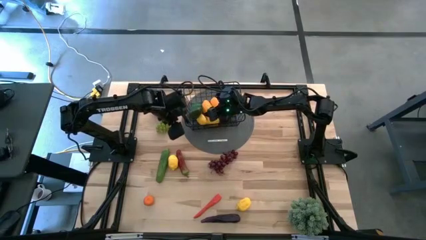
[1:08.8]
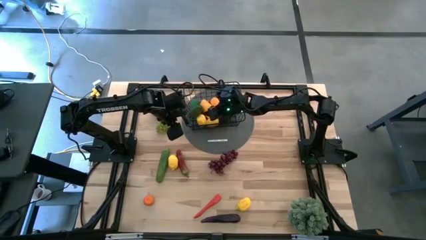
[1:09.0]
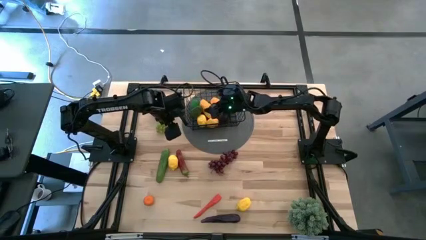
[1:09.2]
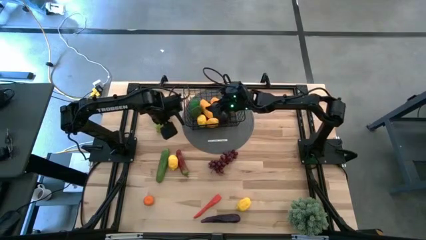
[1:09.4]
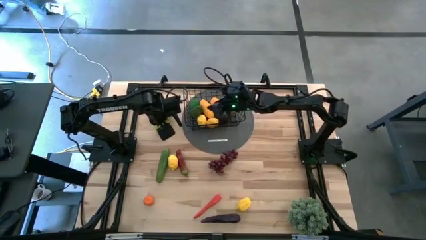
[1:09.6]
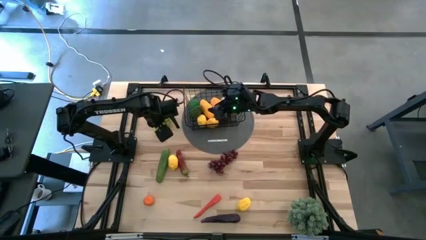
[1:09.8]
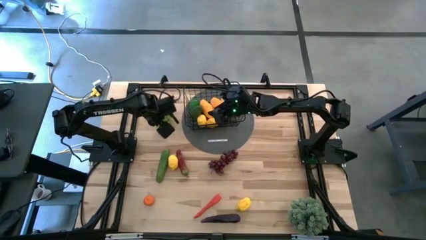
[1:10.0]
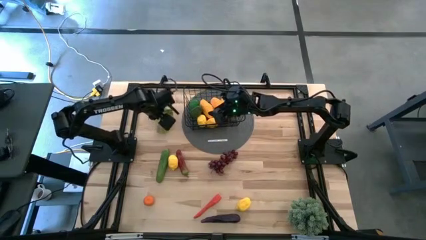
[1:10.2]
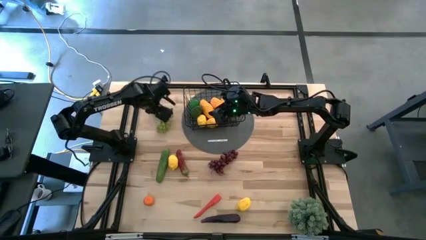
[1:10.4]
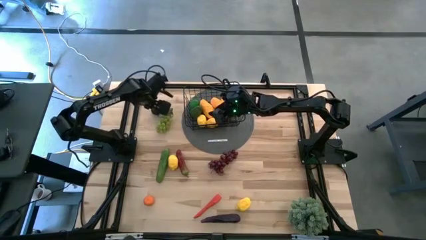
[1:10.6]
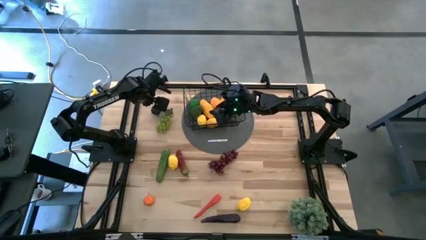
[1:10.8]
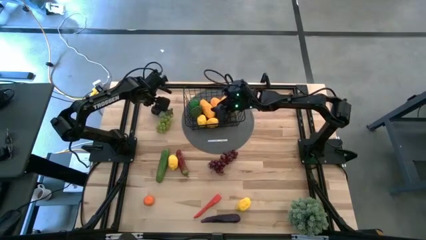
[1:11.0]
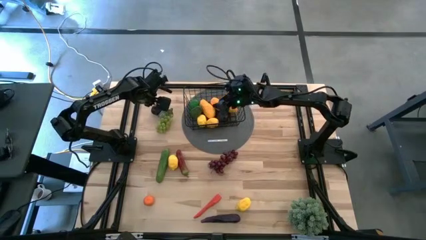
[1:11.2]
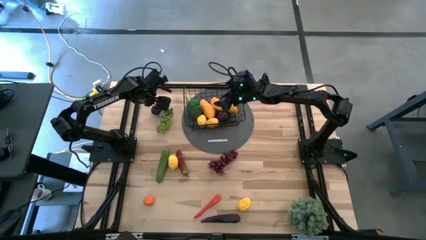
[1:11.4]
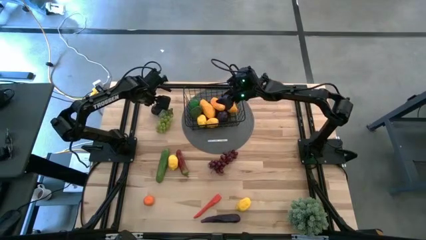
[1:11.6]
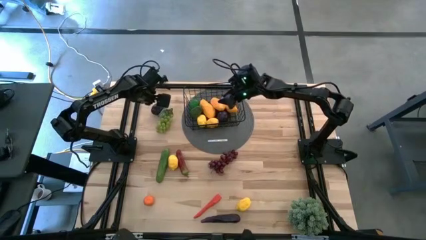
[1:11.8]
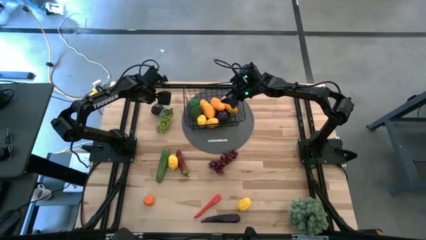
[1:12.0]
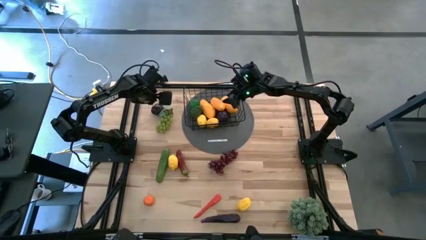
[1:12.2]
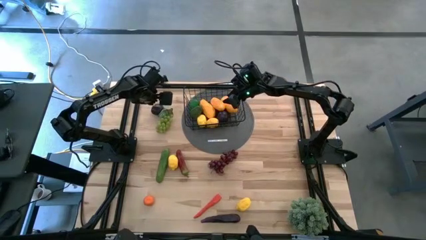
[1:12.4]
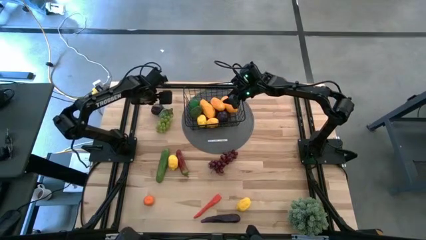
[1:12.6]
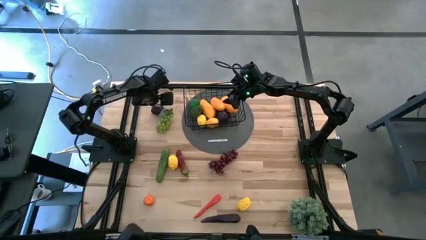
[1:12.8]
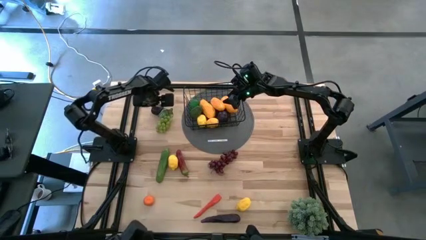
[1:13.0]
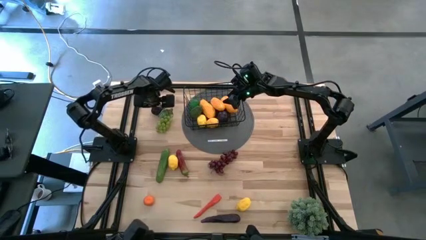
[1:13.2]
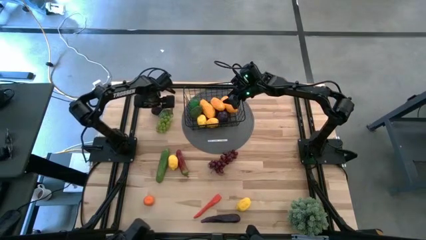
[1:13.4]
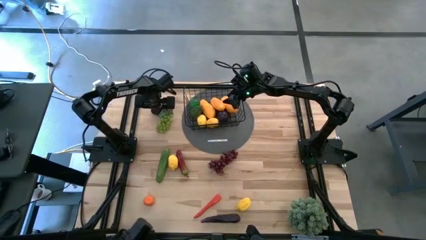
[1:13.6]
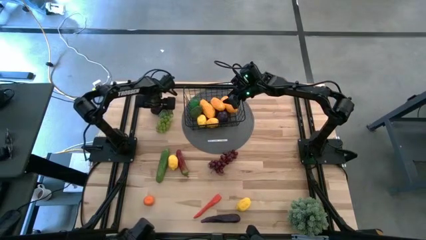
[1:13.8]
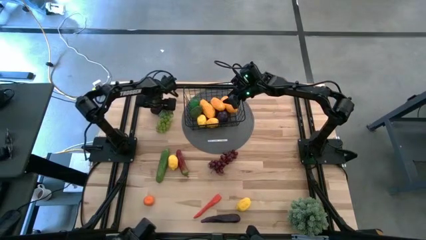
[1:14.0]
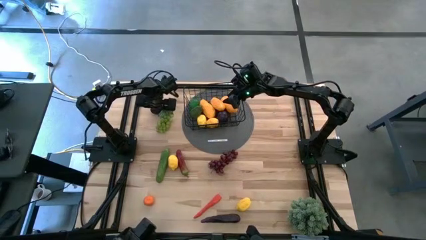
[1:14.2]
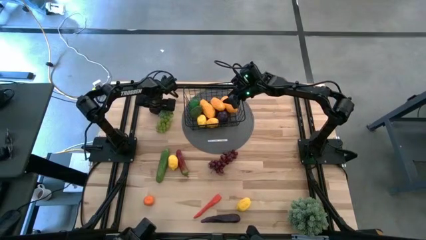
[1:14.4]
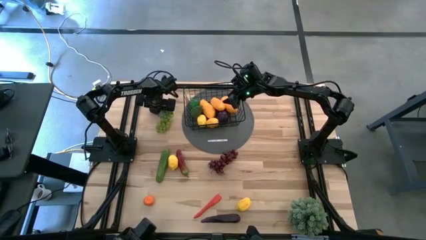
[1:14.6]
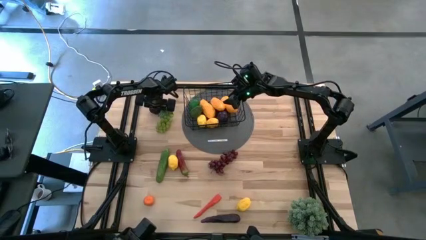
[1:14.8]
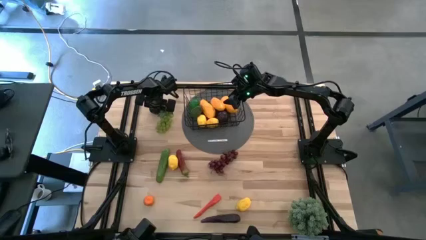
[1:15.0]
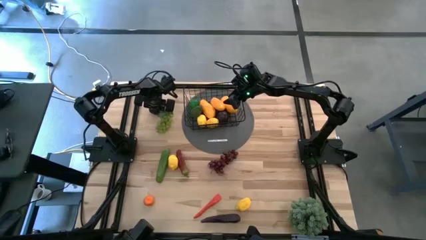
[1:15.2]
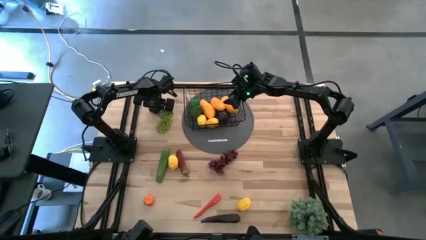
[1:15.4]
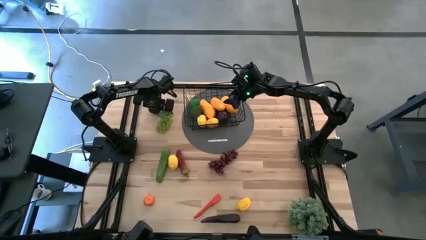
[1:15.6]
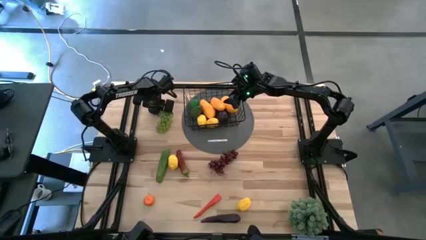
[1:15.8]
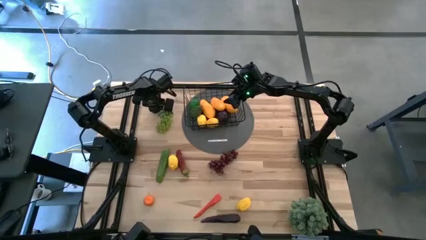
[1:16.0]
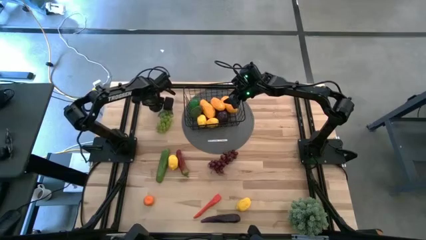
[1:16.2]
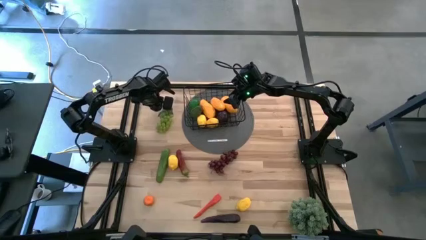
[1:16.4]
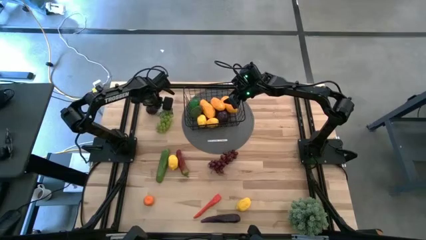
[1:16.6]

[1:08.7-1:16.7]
Task: Build produce basket
Put the plum into the wire basket

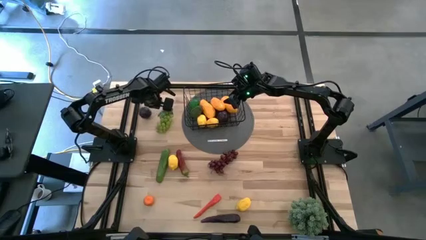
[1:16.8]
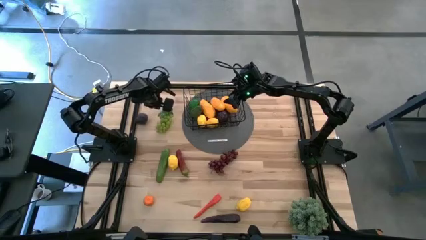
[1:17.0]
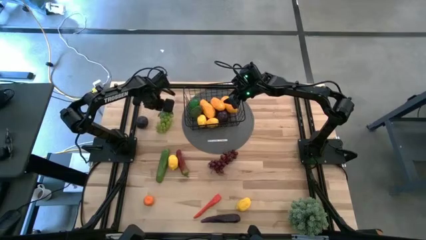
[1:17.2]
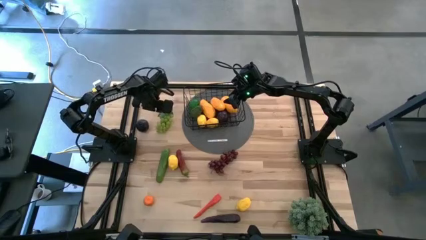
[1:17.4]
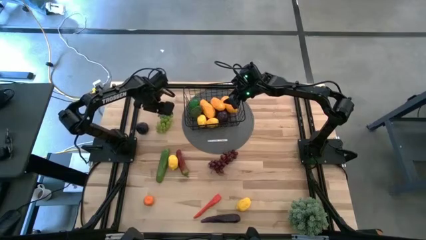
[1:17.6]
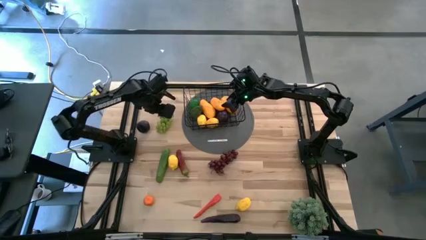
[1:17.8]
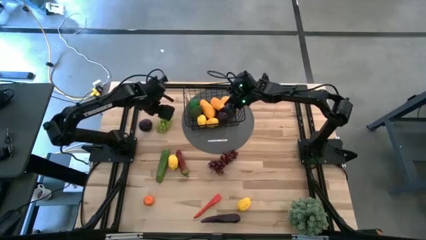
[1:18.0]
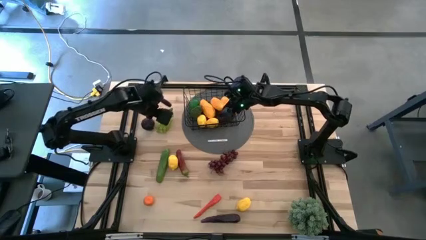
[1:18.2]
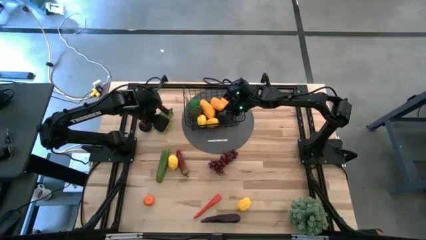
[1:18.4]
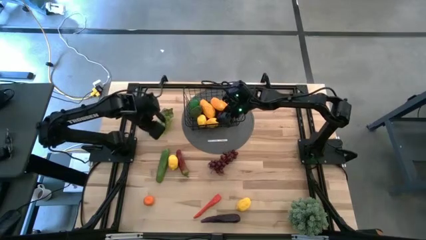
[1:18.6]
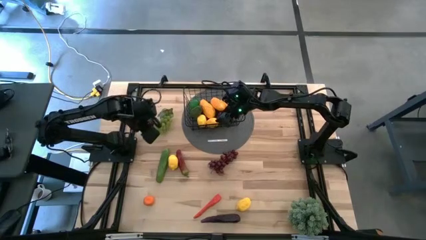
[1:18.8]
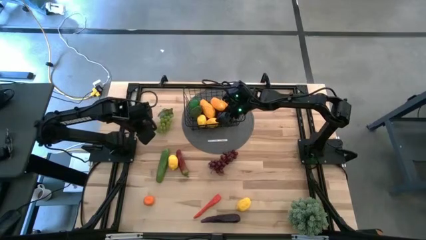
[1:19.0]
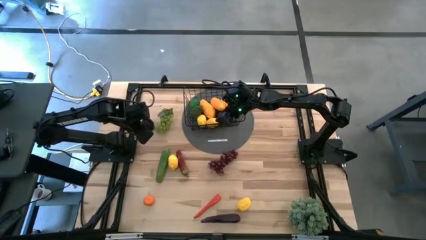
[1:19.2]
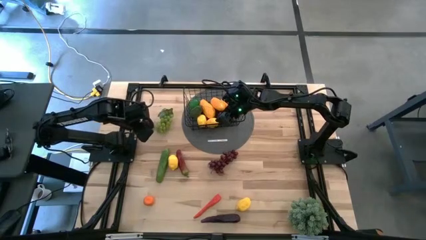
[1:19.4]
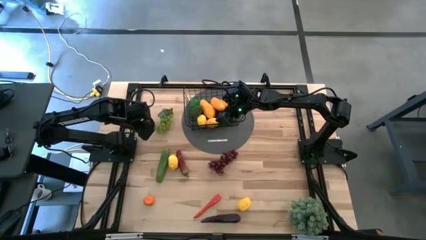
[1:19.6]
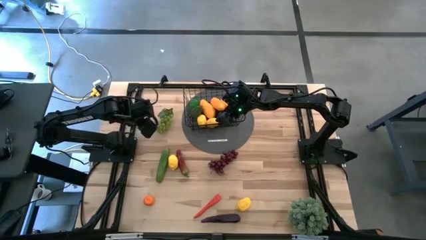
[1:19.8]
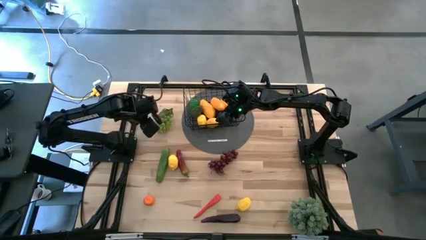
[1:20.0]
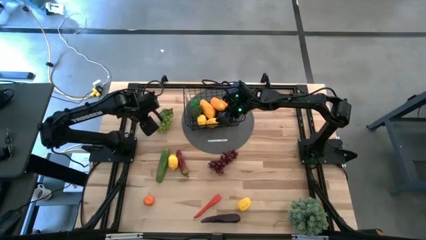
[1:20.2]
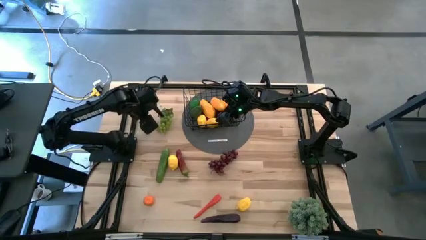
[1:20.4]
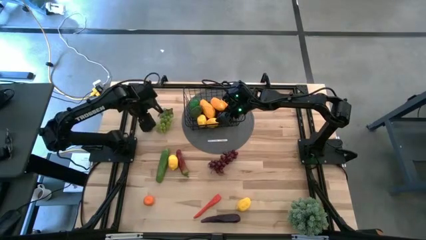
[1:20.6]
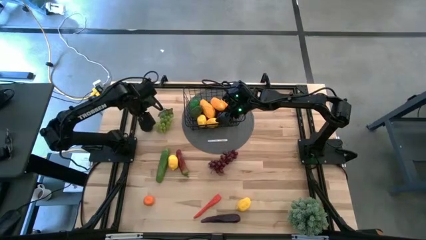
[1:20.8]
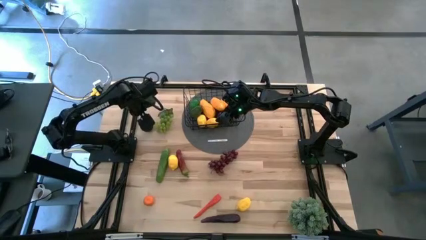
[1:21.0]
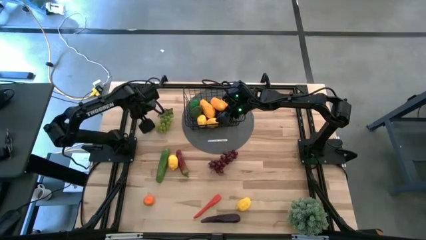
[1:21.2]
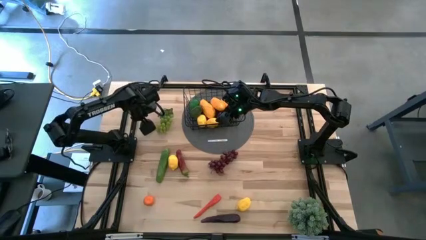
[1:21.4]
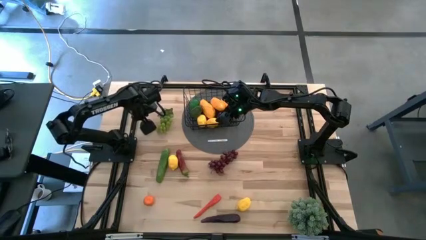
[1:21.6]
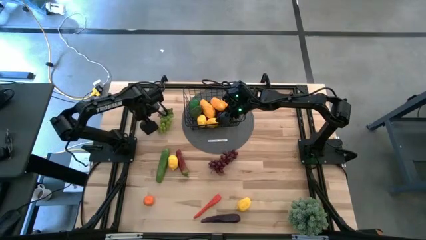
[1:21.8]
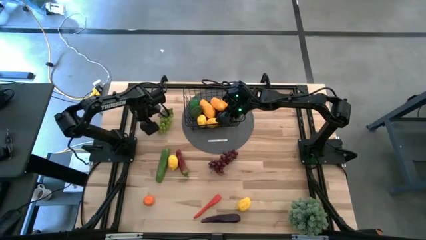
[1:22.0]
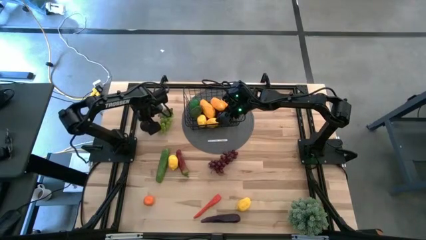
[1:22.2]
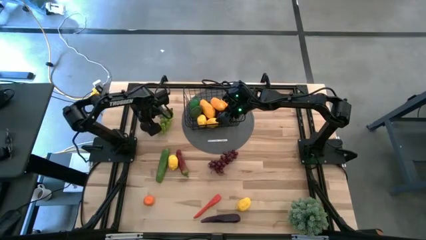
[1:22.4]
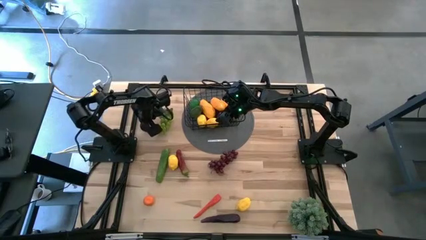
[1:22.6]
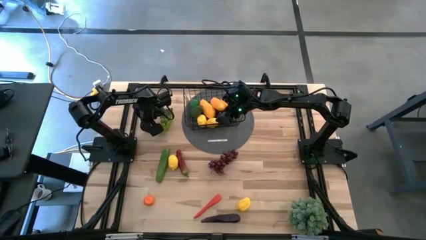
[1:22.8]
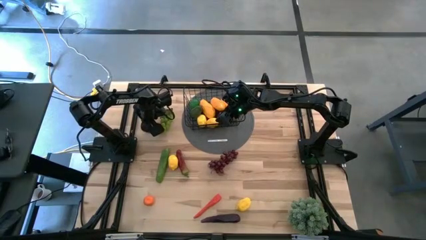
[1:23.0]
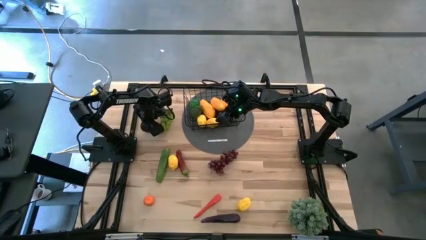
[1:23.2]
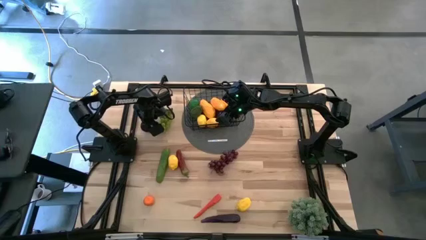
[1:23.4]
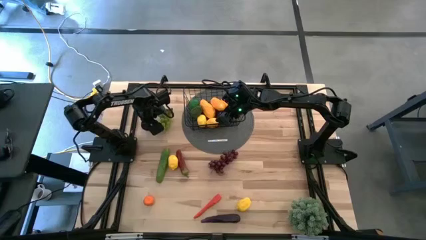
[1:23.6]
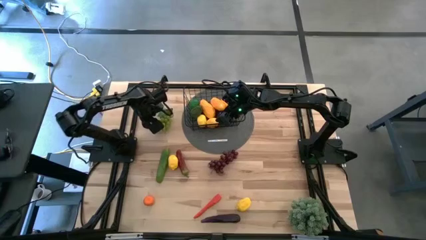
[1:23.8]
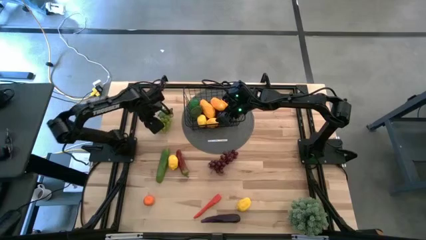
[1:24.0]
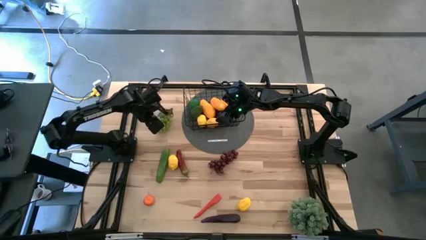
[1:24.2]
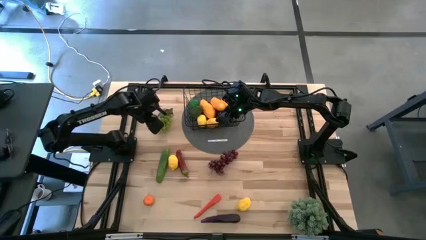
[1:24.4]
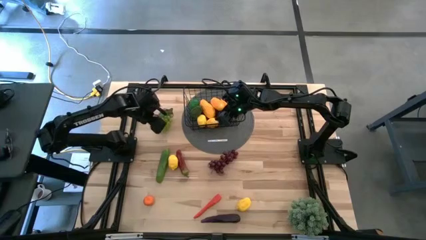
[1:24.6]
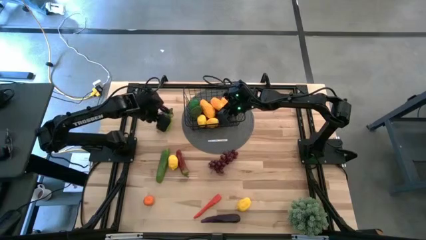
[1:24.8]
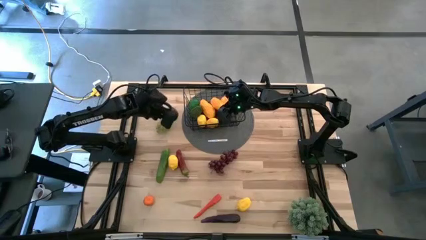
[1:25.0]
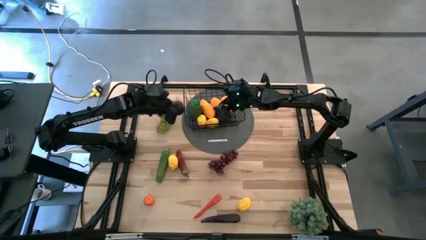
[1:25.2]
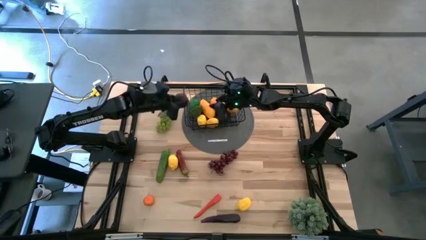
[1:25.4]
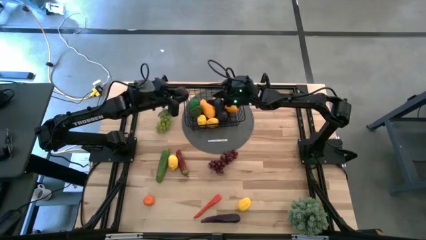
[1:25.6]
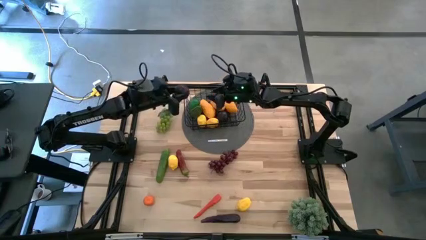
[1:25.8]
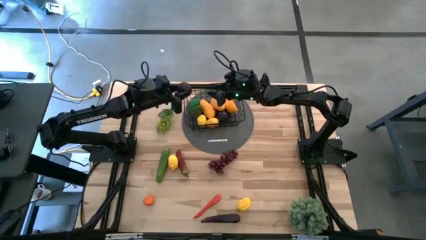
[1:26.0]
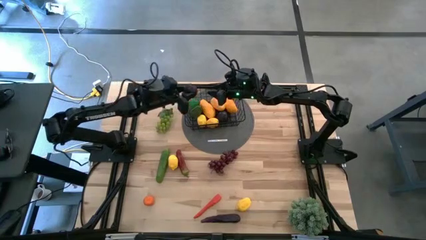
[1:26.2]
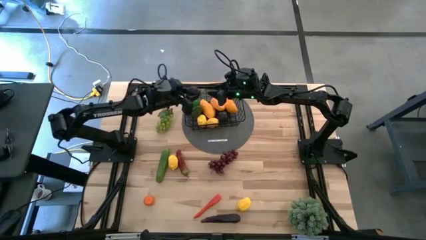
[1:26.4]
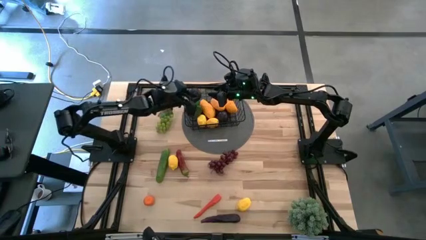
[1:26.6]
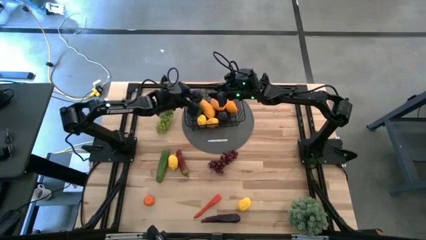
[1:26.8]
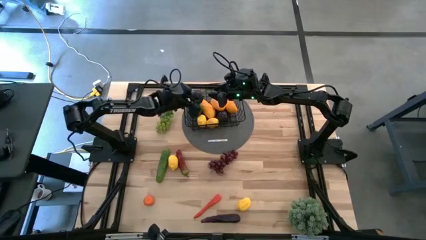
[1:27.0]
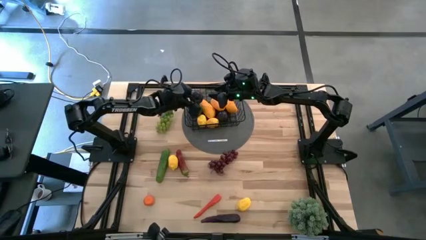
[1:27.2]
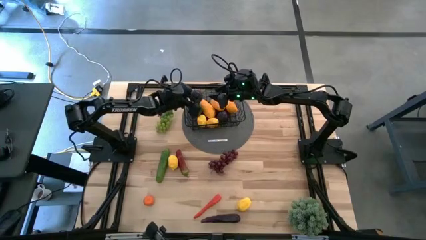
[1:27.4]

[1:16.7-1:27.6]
Put the plum into the wire basket
